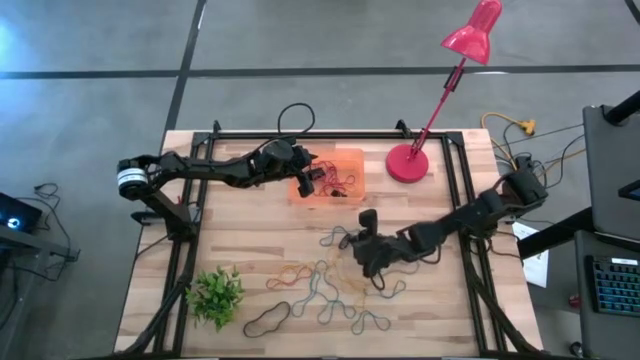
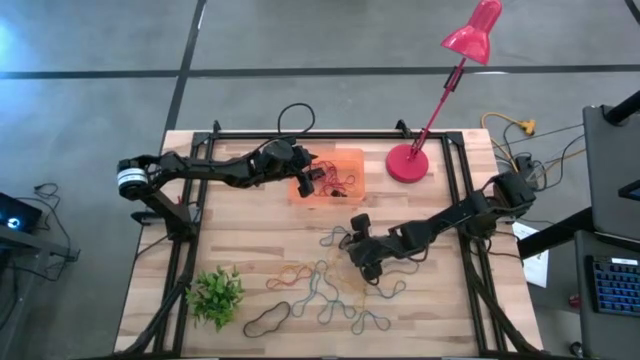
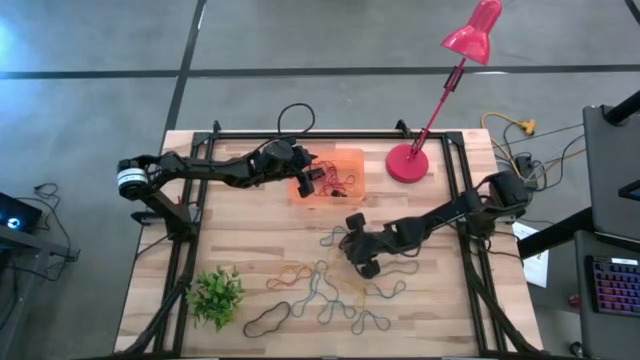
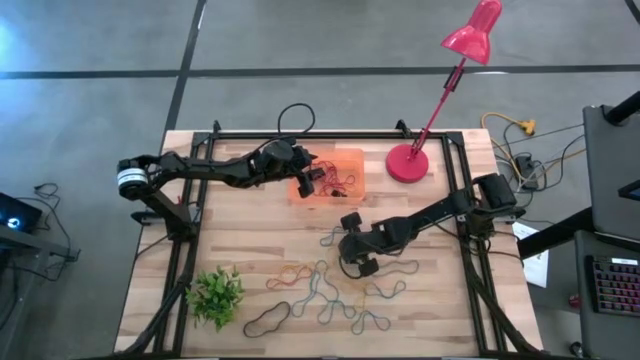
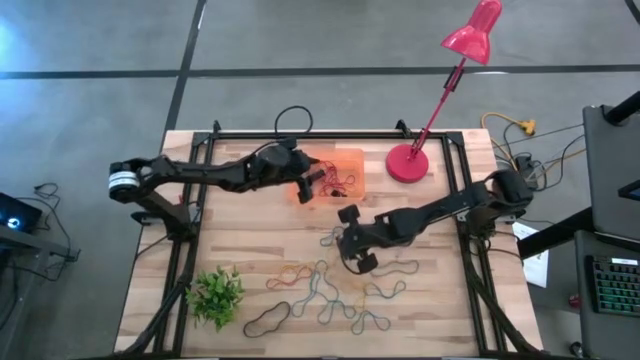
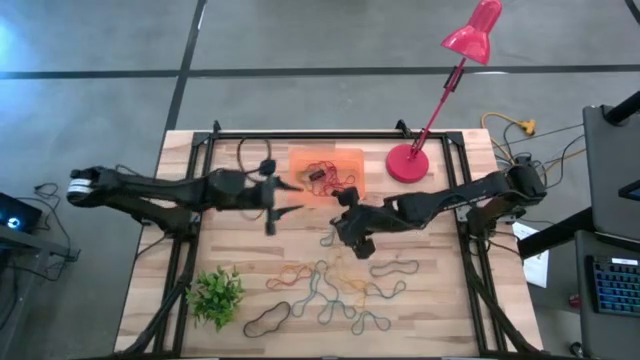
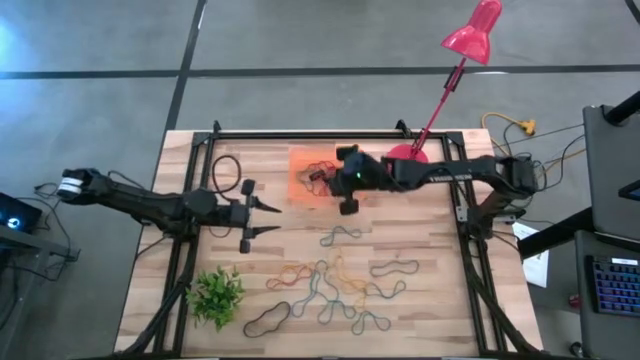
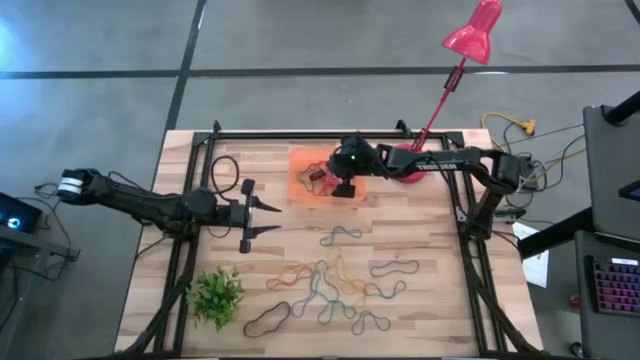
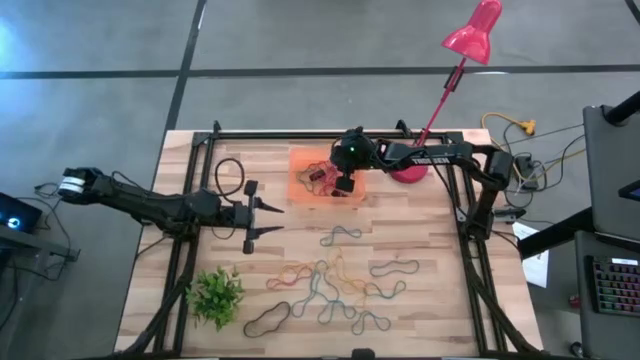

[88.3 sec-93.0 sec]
Task: Pick and place rubber bands into bin
Put the black rubber band into the orange bin

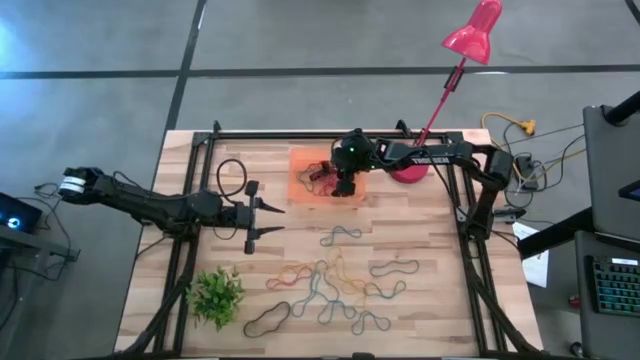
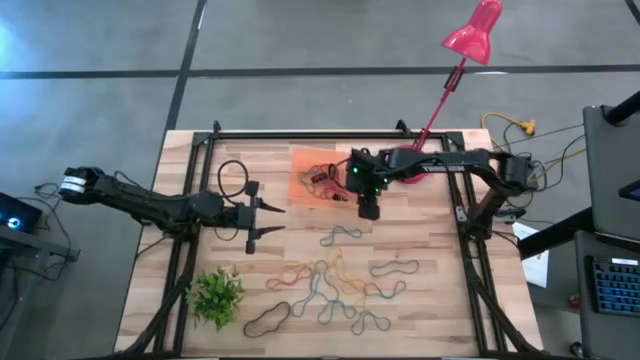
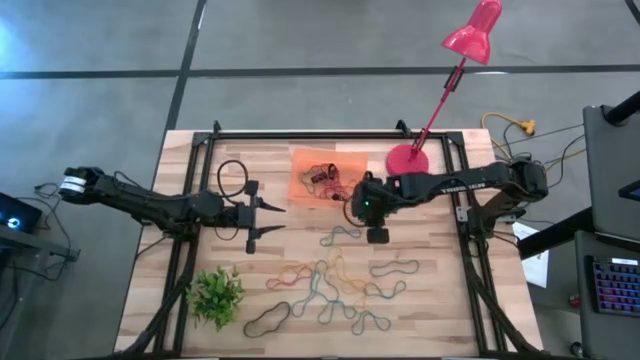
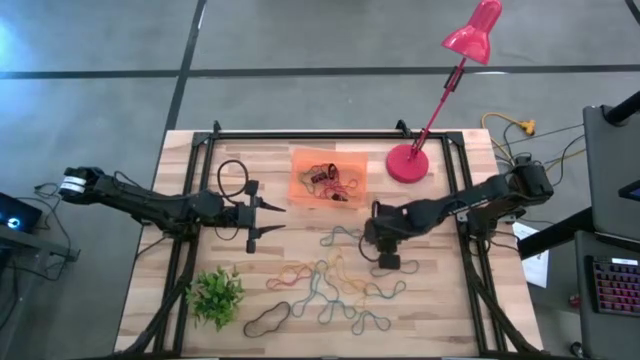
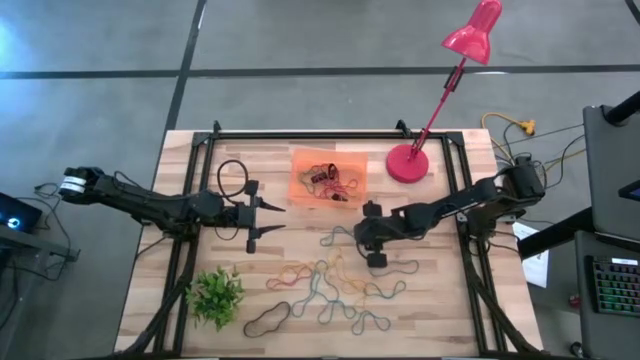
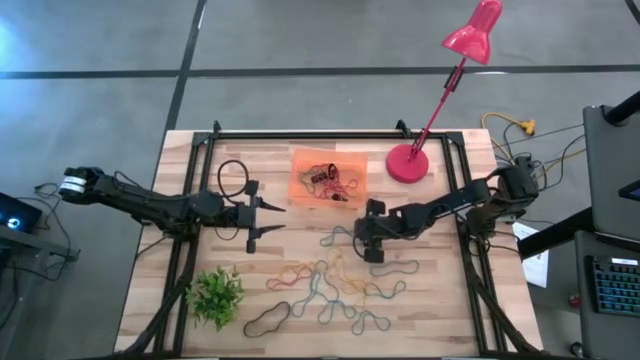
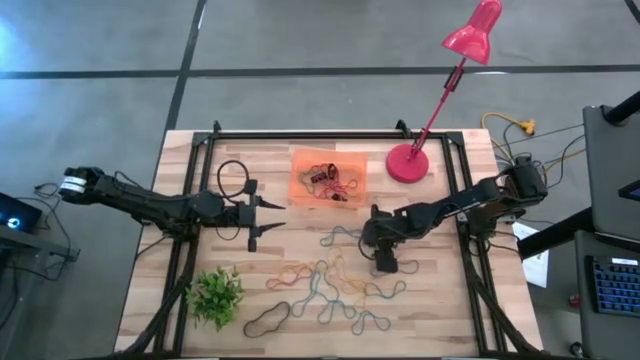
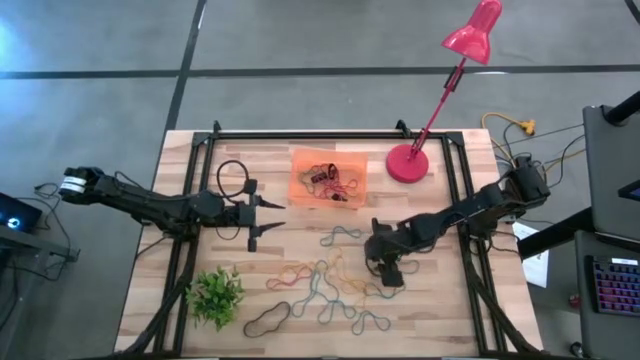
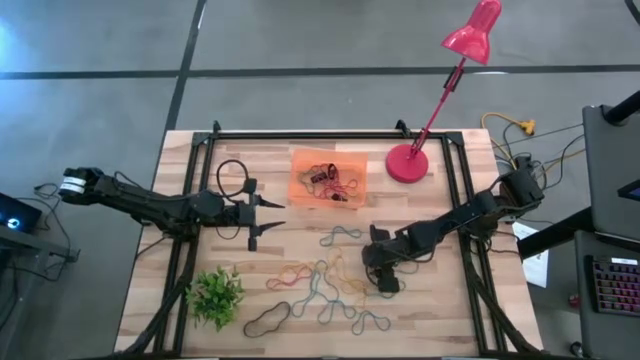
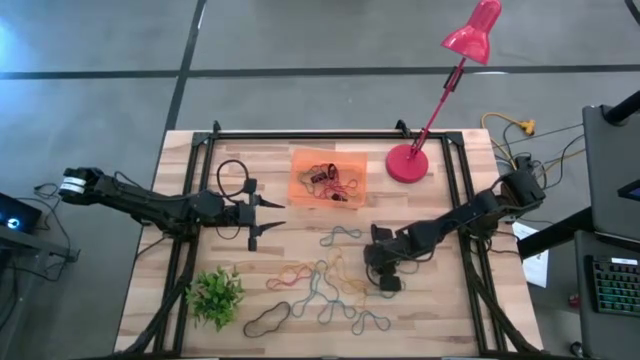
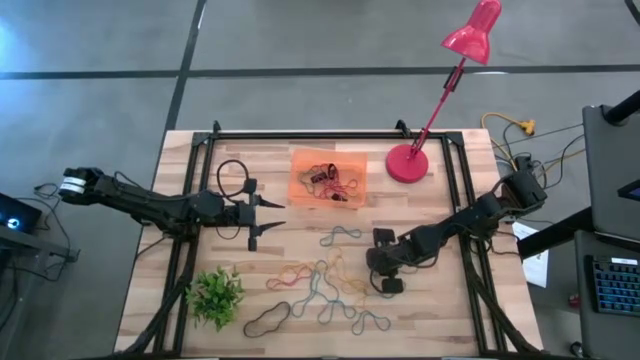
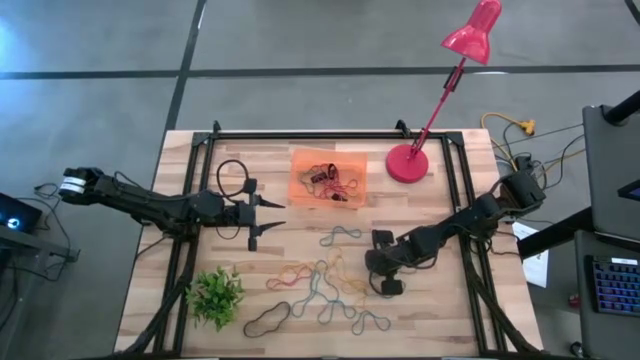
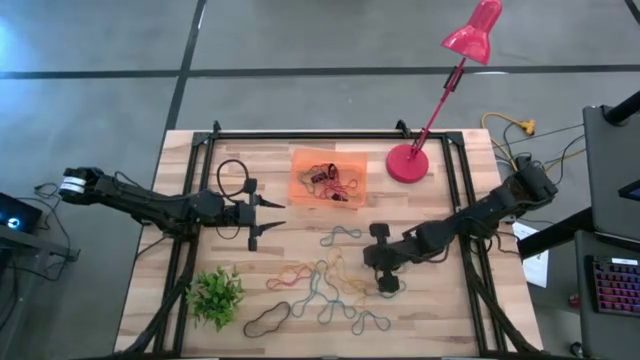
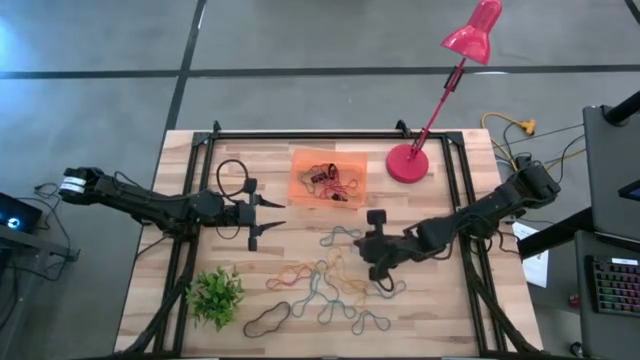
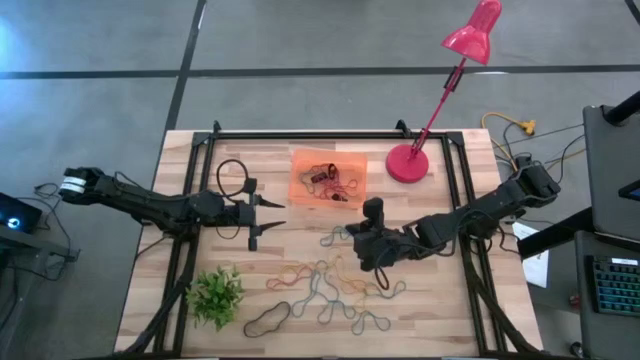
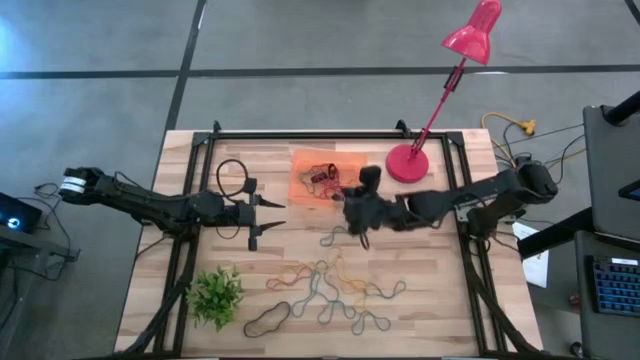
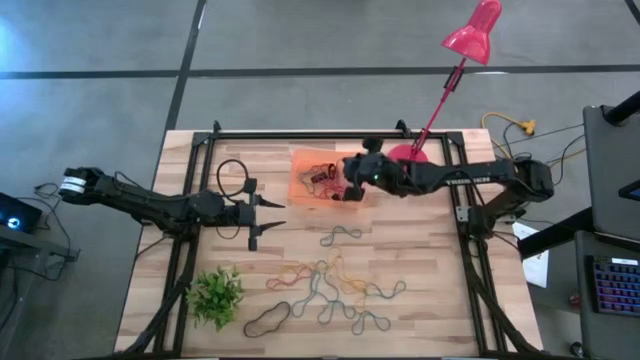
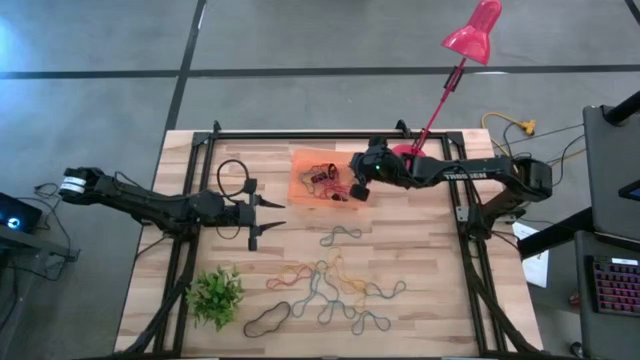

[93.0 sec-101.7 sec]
Put the blue rubber band into the orange bin

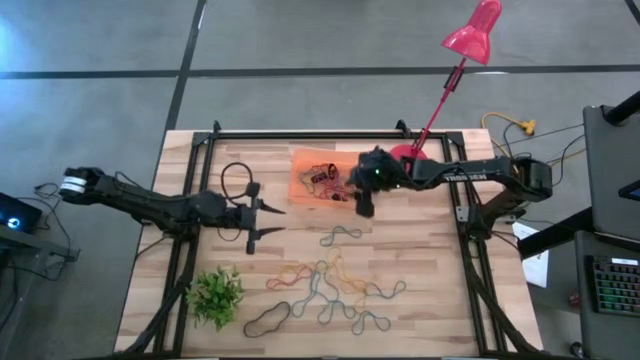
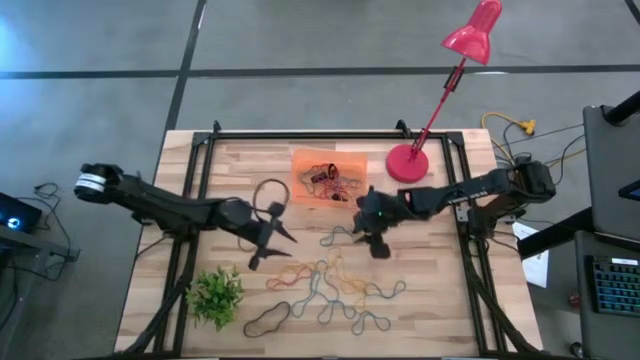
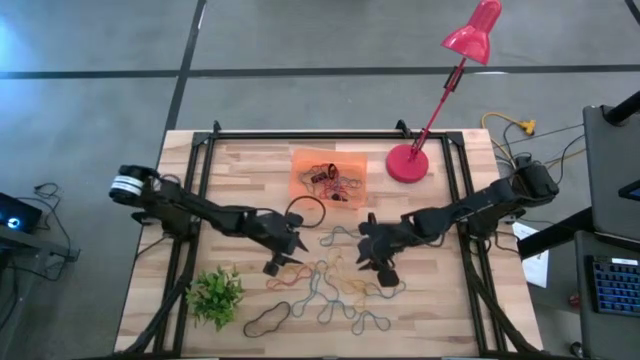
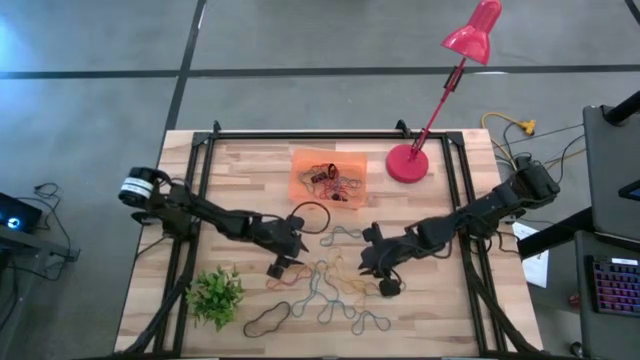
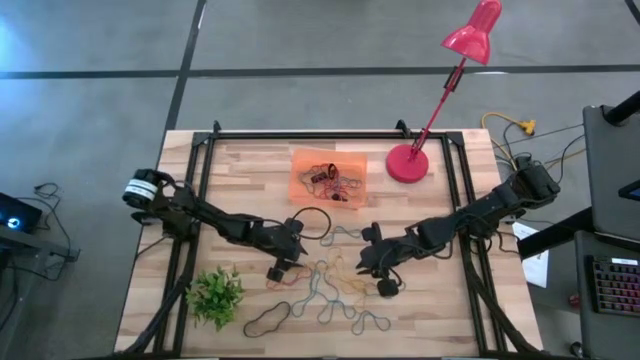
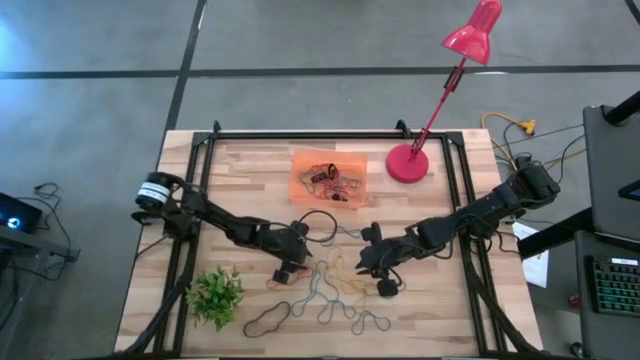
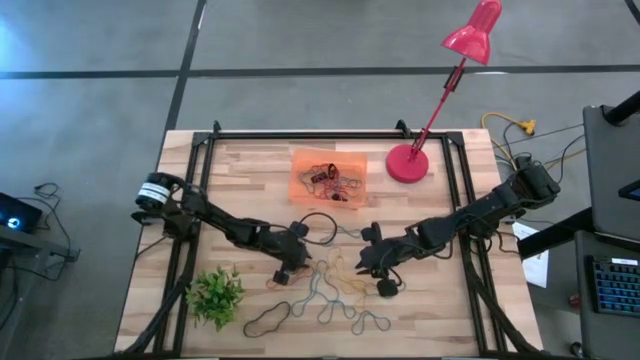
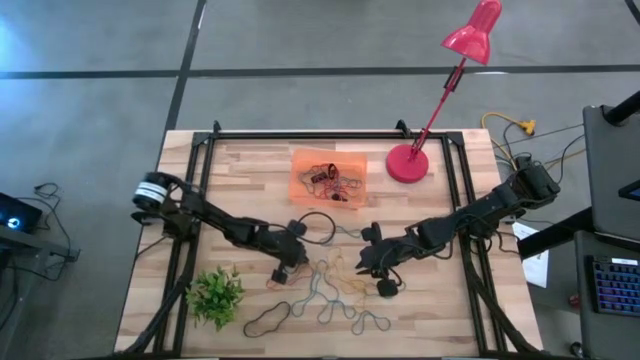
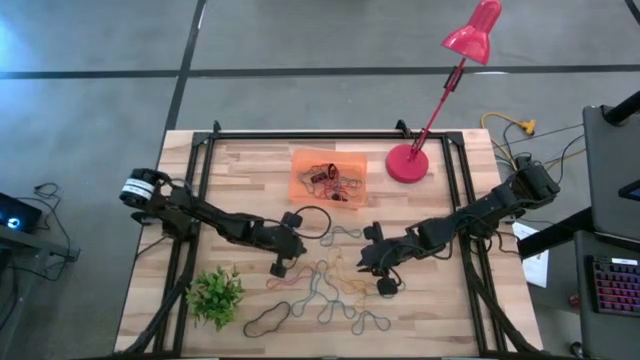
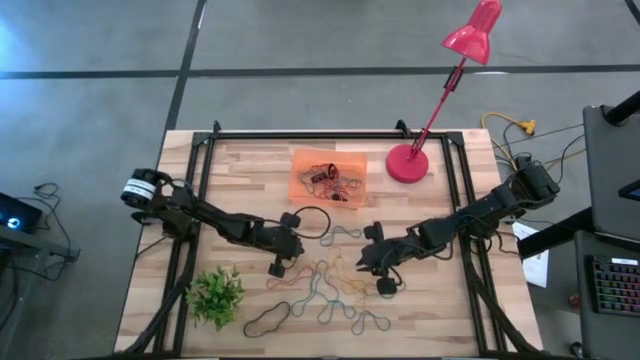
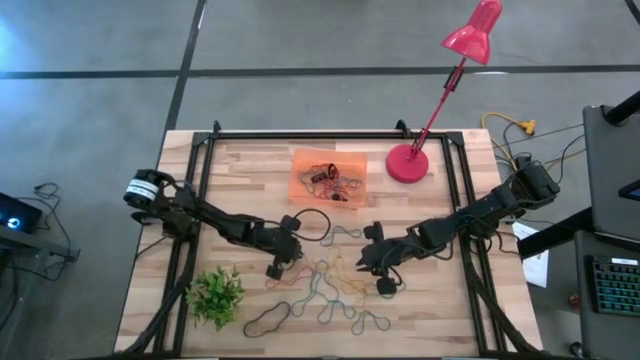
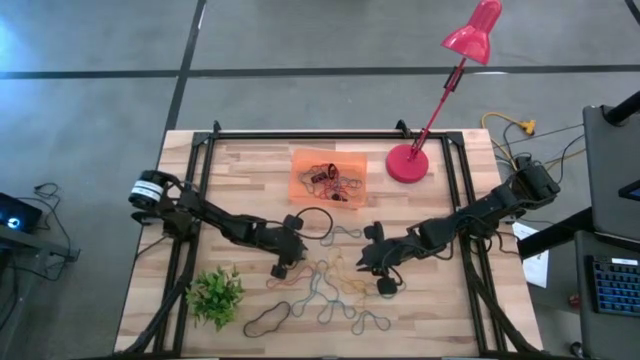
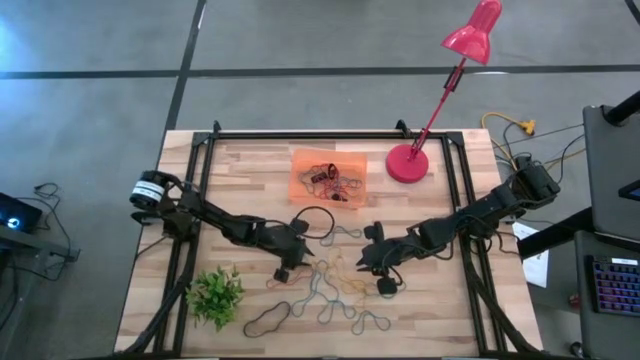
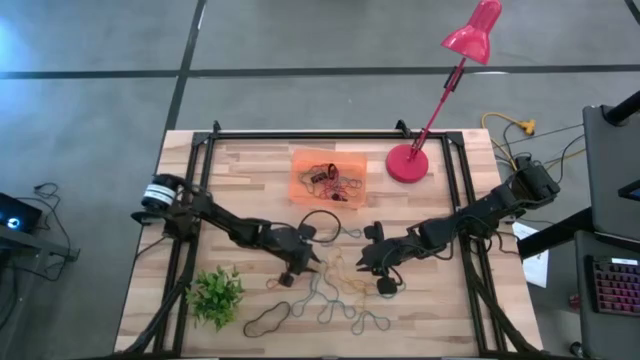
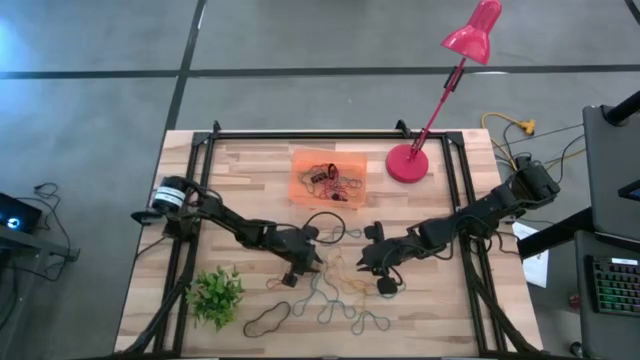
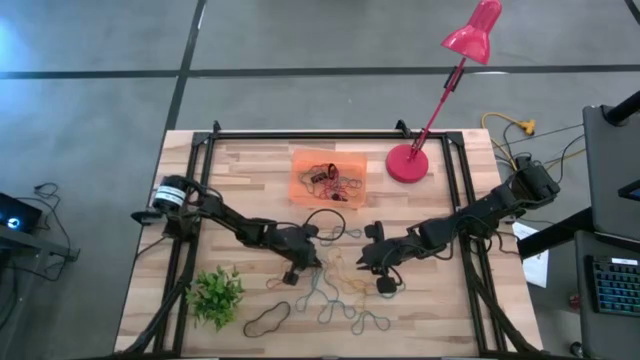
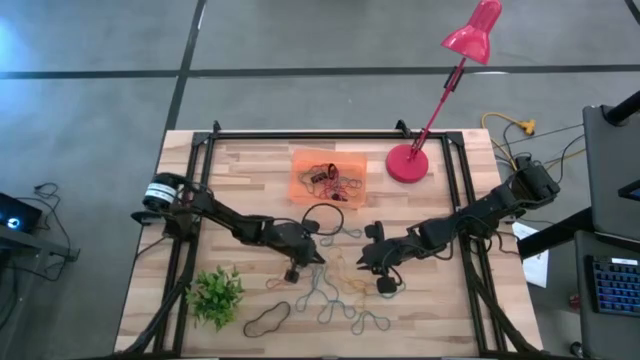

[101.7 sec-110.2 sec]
Put the yellow rubber band into the orange bin
